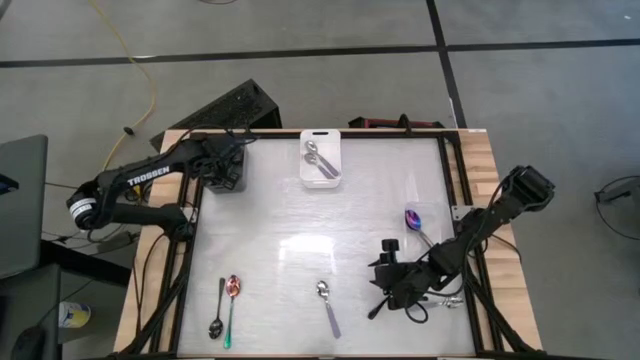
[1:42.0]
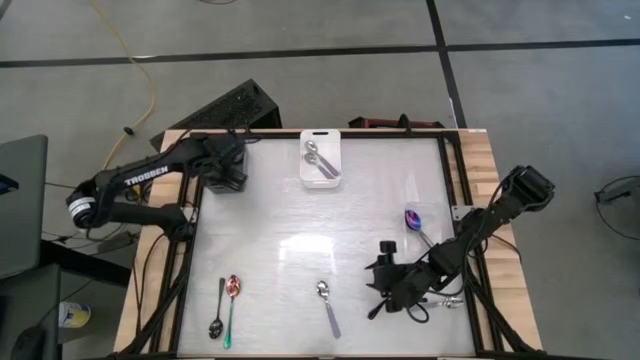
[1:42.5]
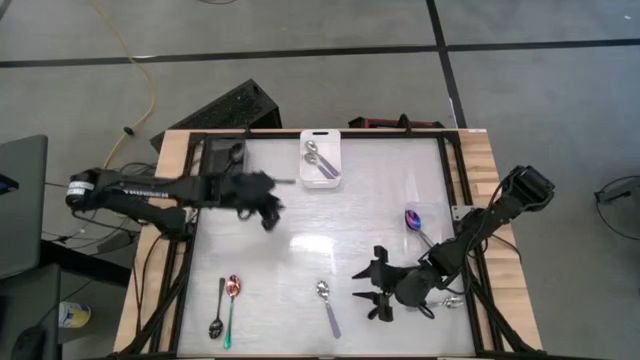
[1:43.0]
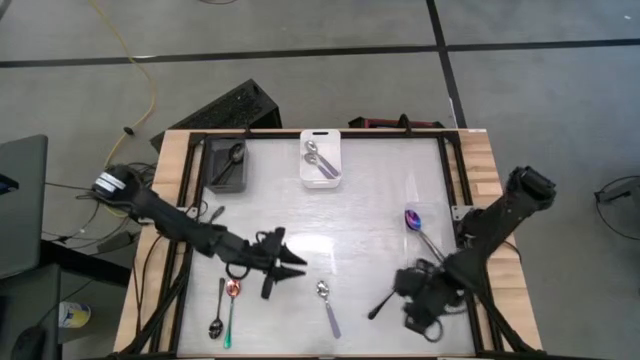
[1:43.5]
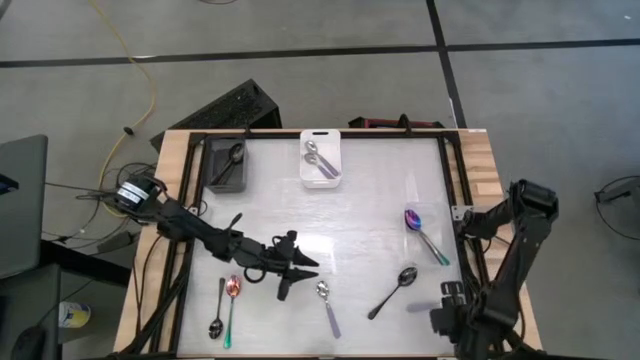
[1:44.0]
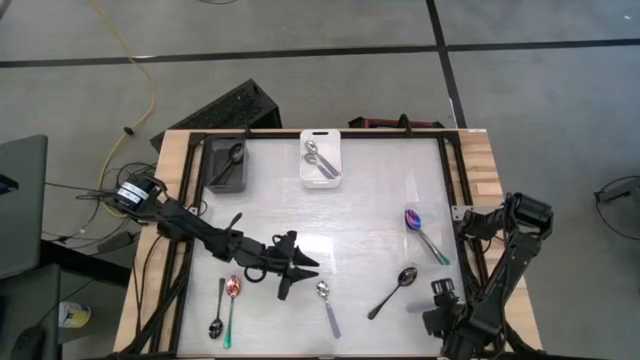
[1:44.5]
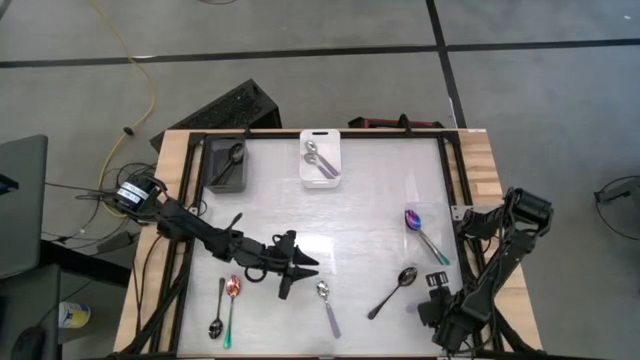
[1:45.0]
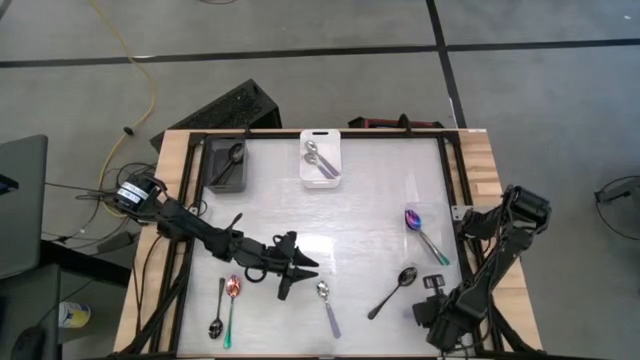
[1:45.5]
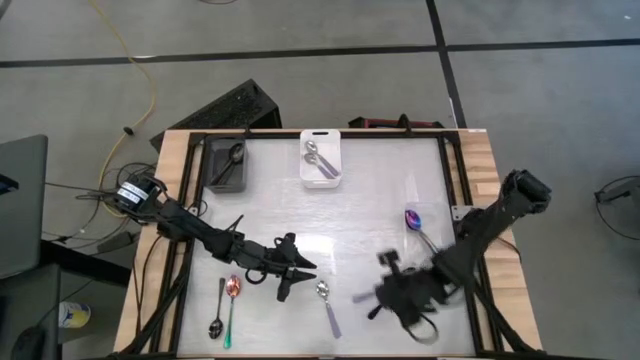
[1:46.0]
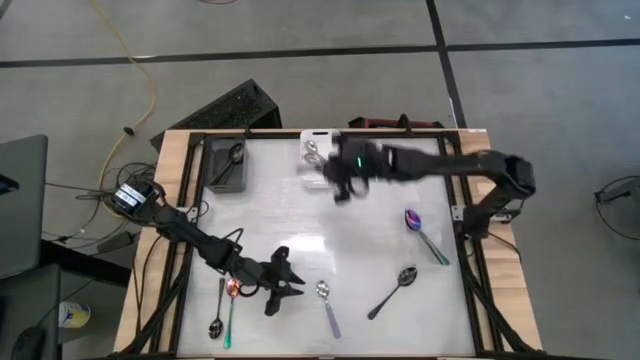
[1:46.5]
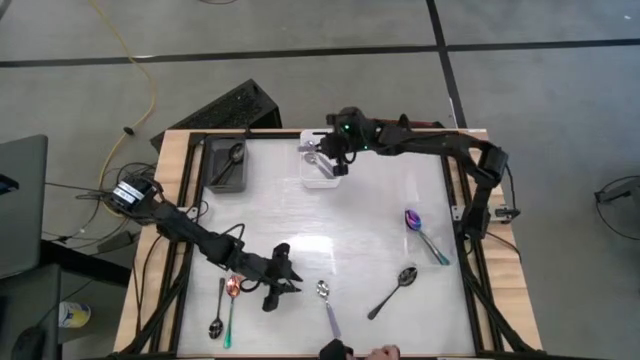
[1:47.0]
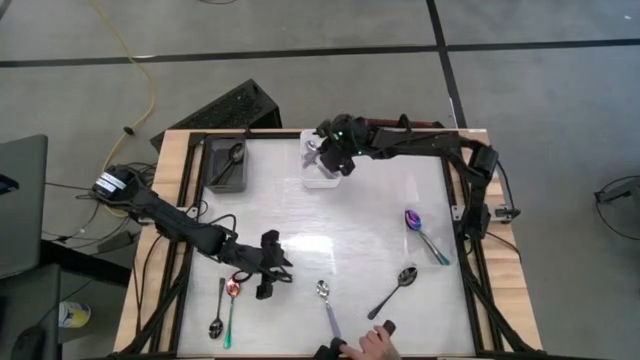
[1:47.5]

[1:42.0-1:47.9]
Task: Sort silverware by color (type)
Put the purple spoon into the white bin

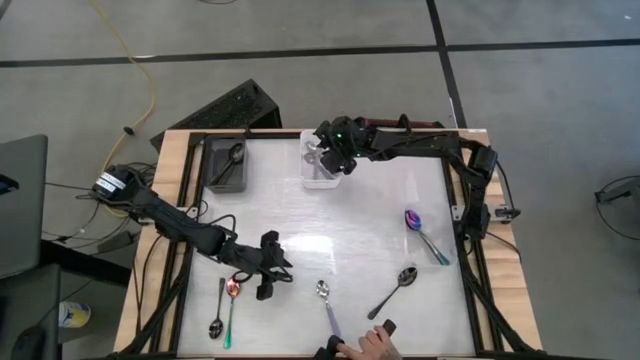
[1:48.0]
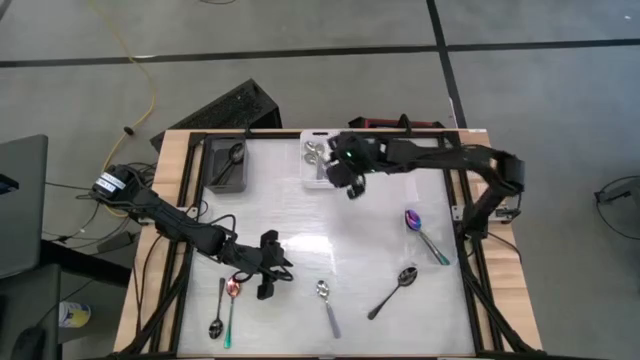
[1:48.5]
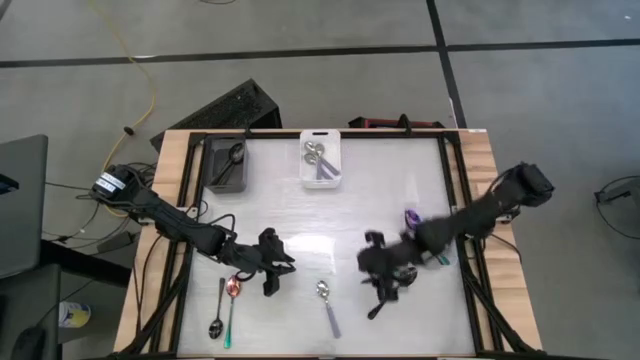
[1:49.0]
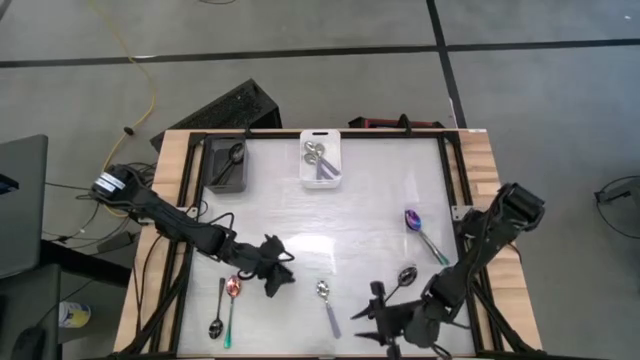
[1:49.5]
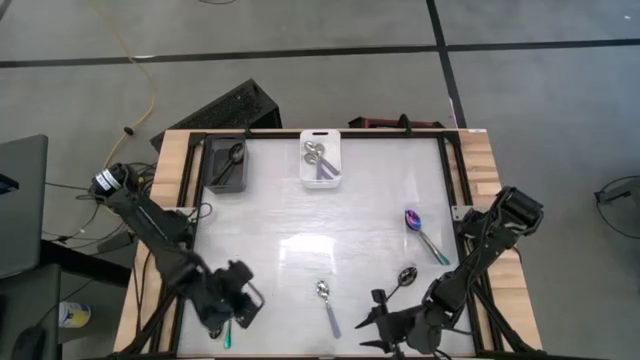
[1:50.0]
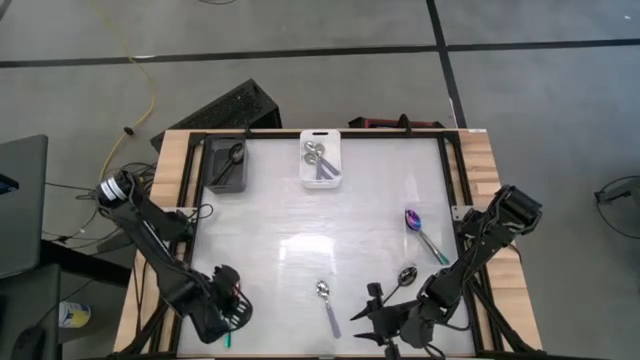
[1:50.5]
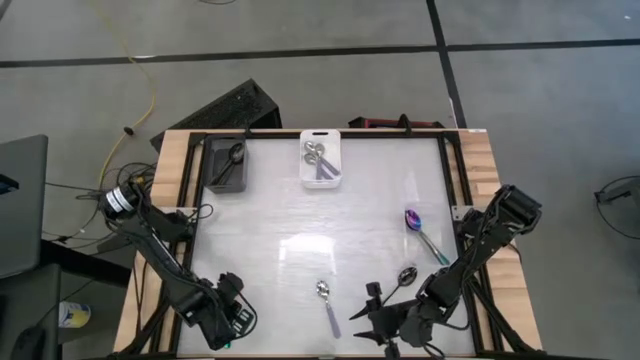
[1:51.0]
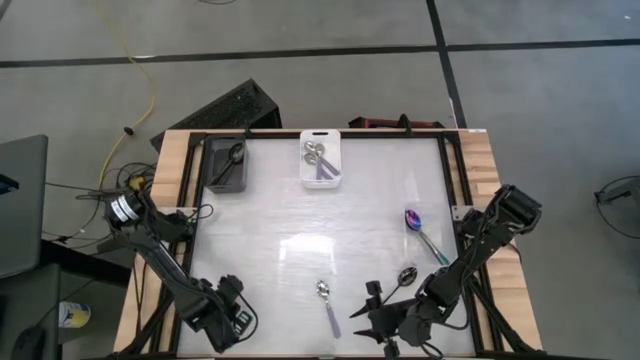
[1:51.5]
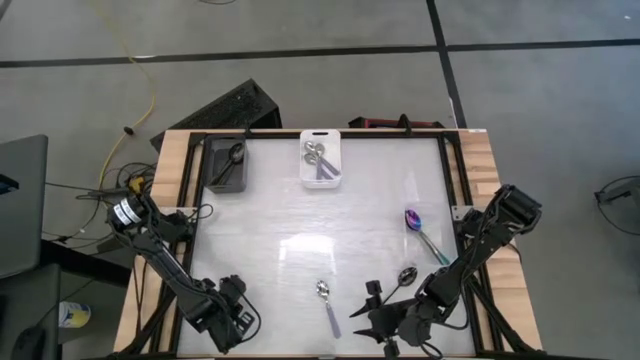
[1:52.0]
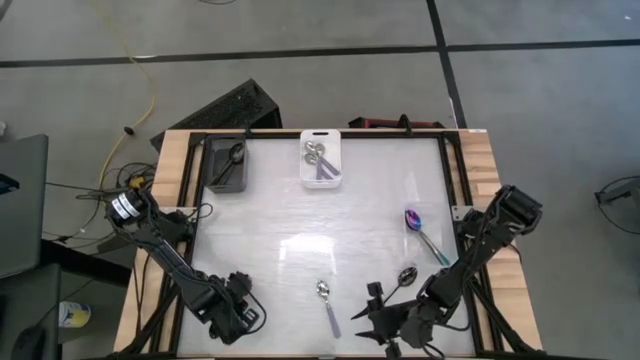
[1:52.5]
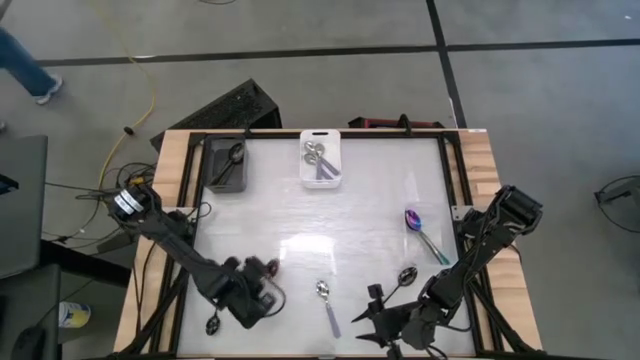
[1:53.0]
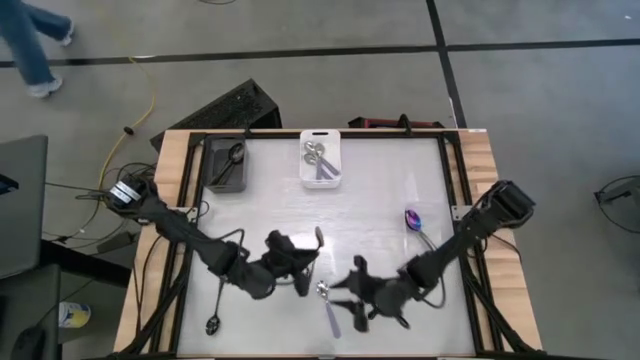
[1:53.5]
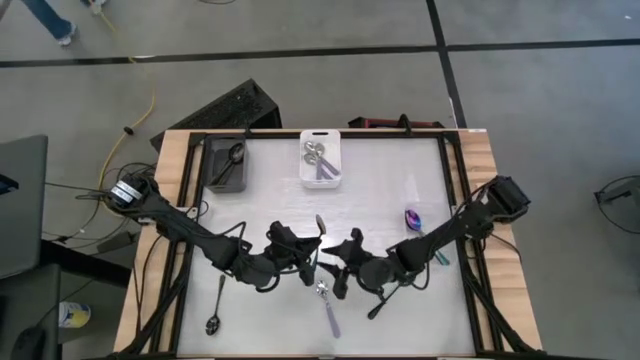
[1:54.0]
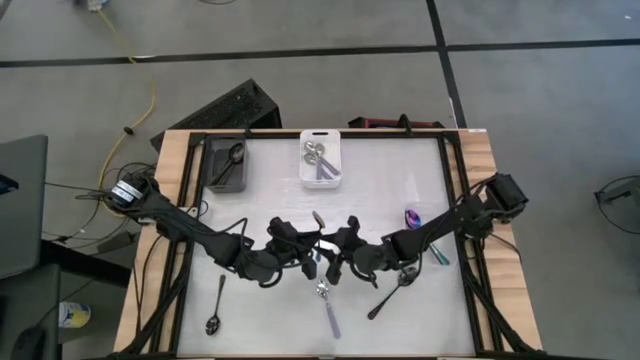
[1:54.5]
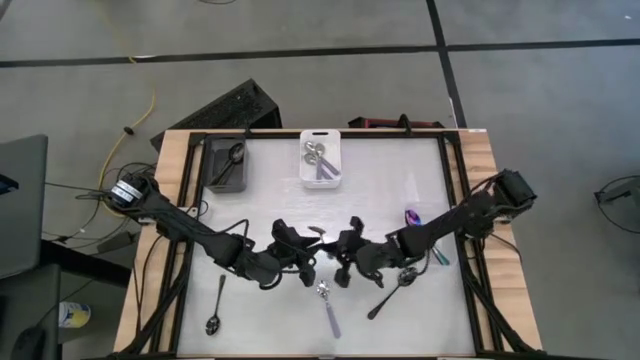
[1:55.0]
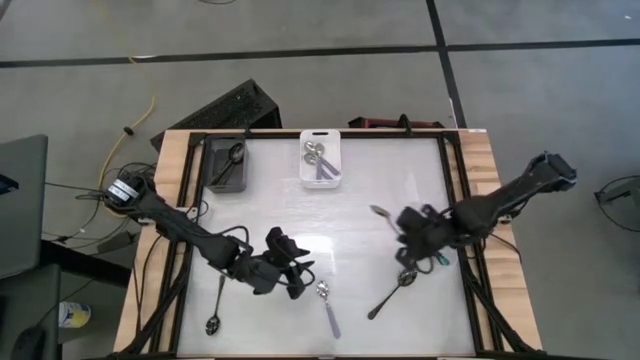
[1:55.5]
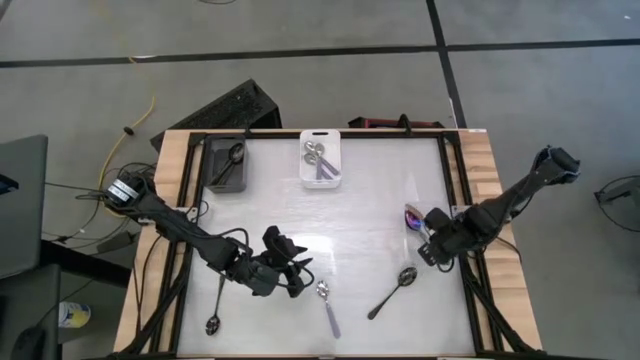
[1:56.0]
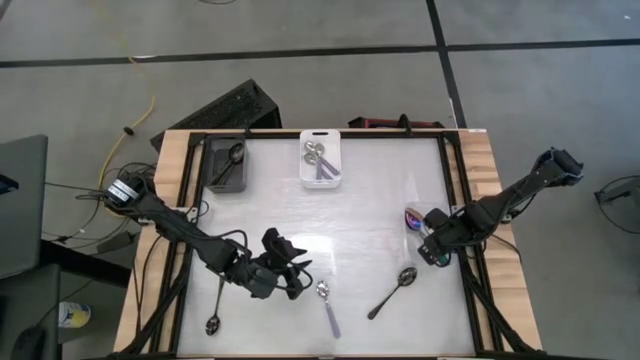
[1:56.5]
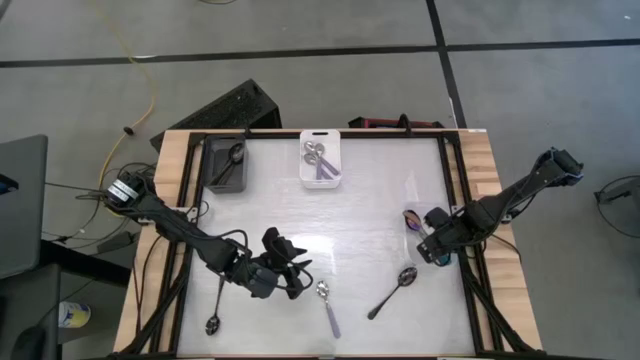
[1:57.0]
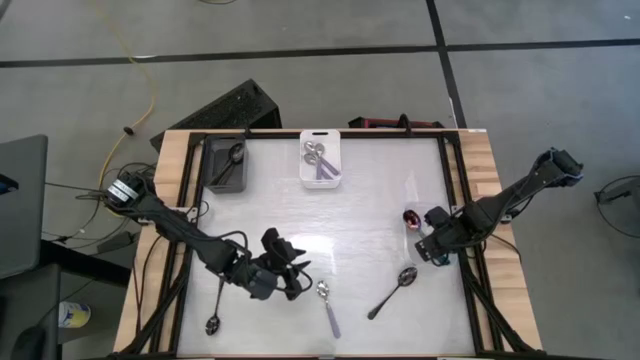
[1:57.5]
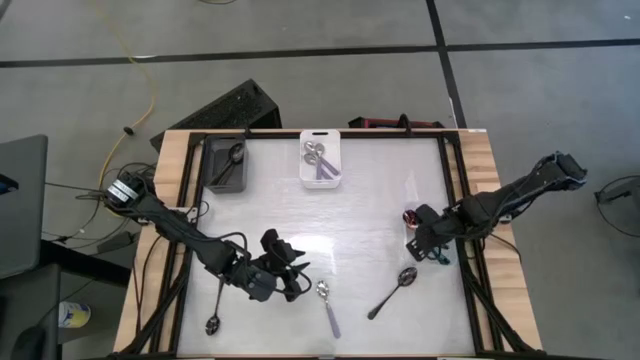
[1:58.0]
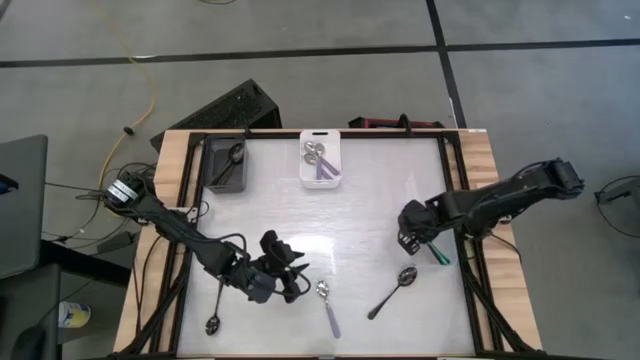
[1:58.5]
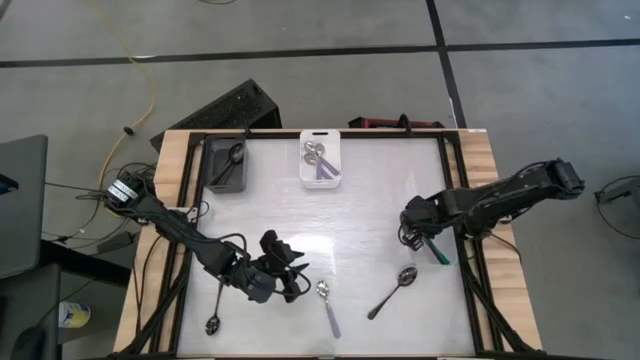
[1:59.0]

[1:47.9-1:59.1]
Put the blue spoon into the transparent bin

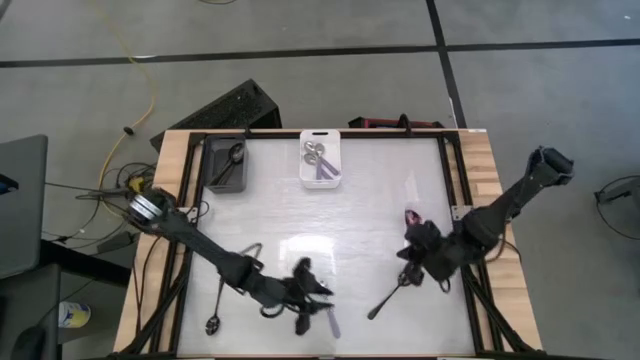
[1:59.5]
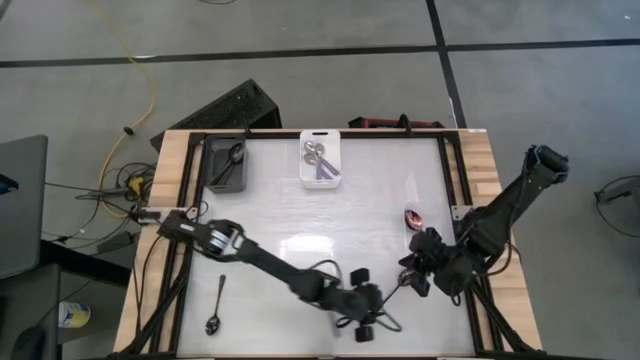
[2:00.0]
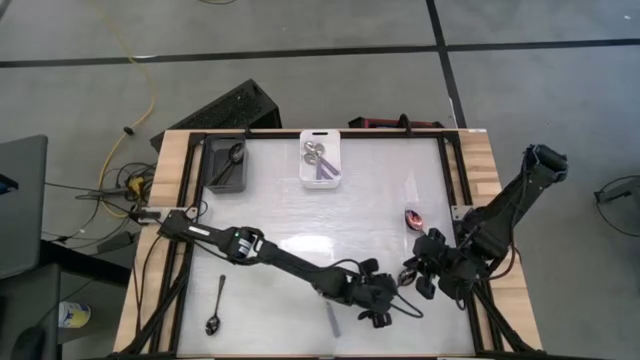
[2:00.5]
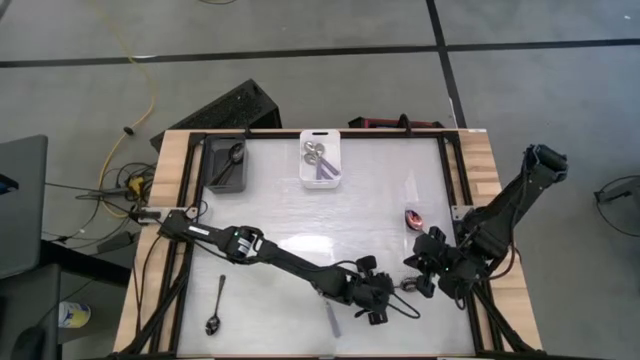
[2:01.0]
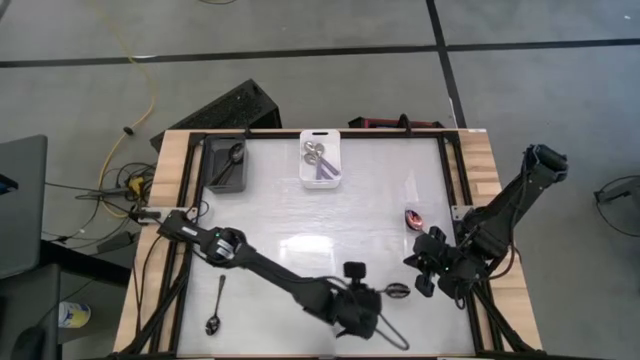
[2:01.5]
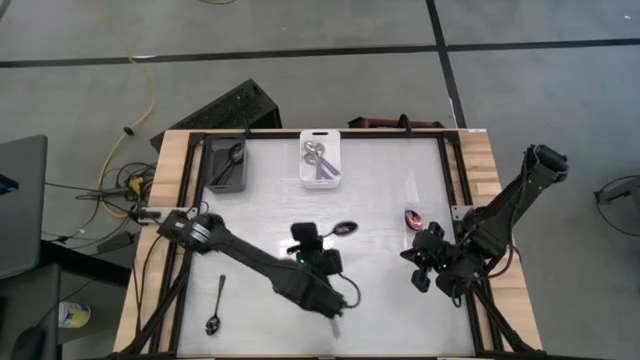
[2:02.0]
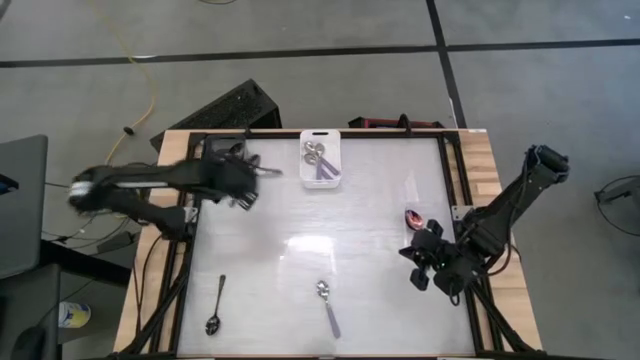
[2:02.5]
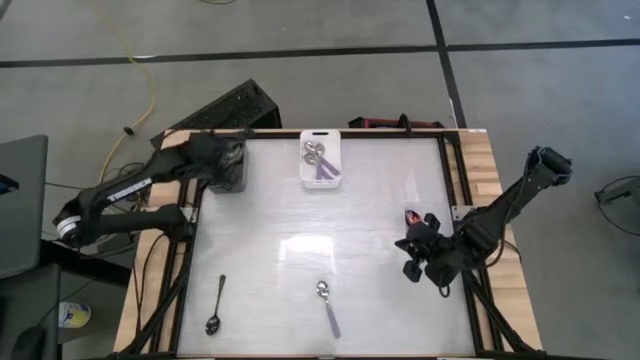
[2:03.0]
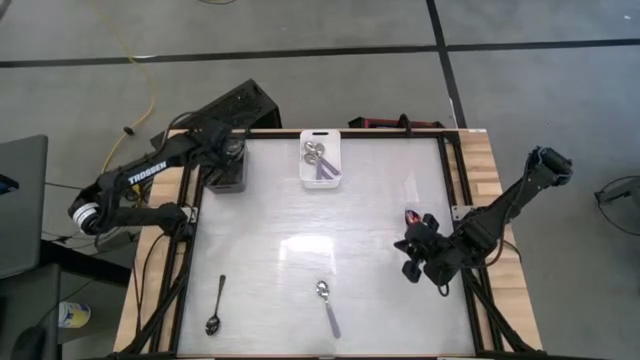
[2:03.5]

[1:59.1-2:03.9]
Put the black spoon into the black bin
